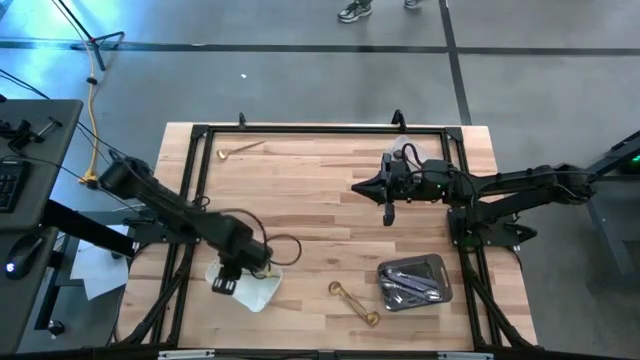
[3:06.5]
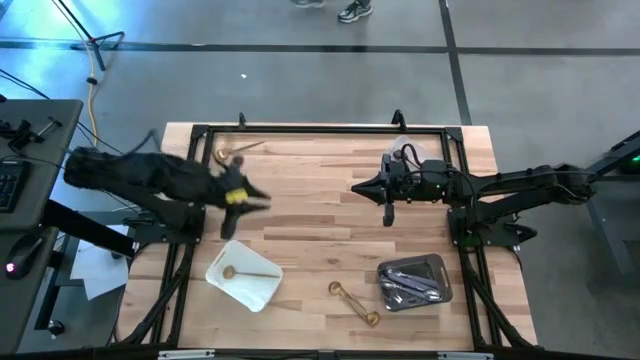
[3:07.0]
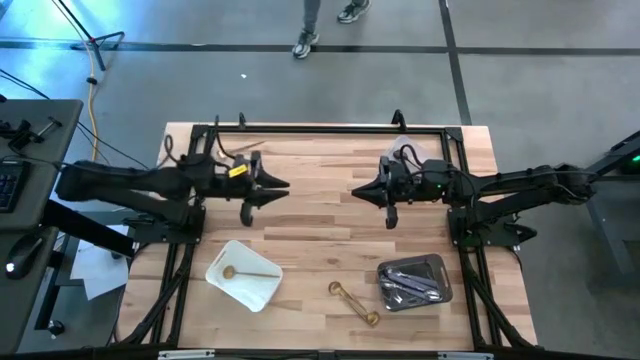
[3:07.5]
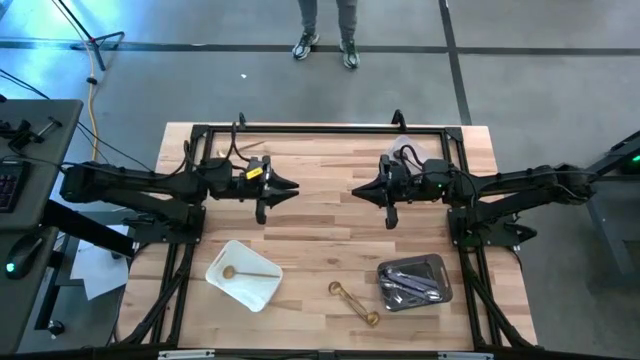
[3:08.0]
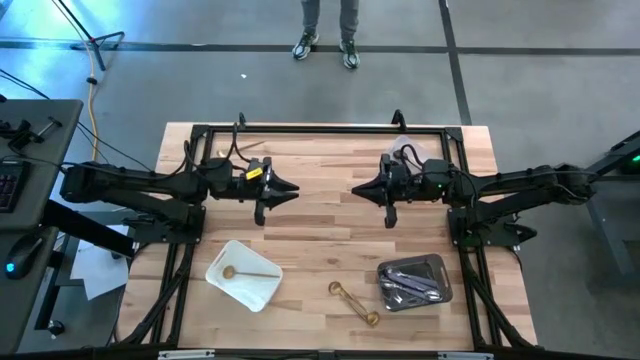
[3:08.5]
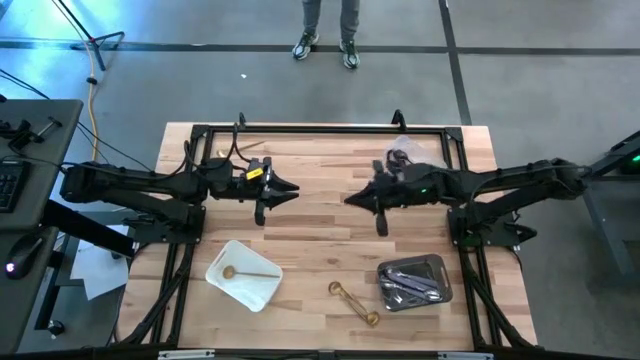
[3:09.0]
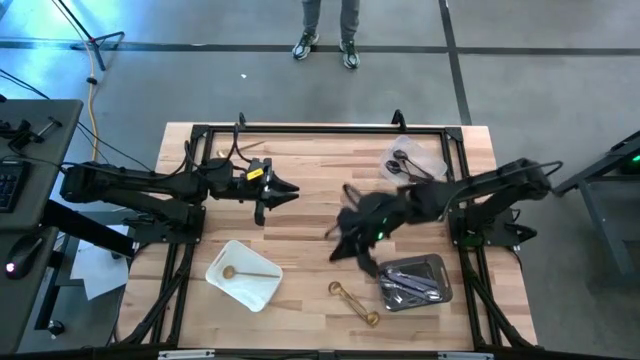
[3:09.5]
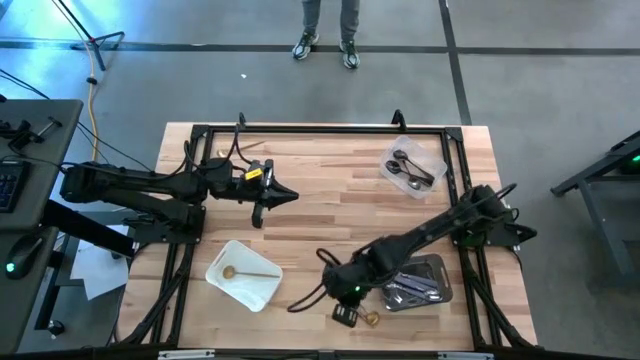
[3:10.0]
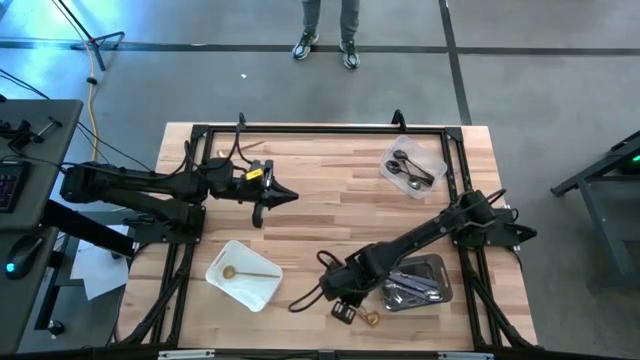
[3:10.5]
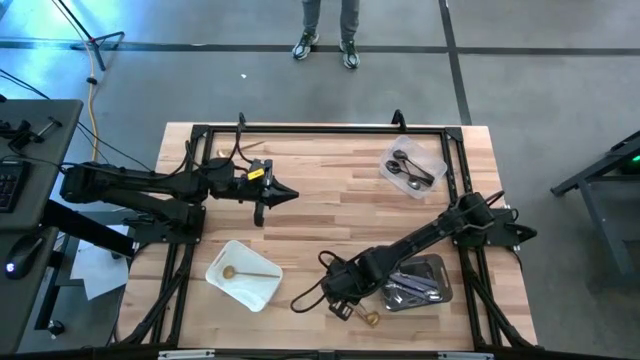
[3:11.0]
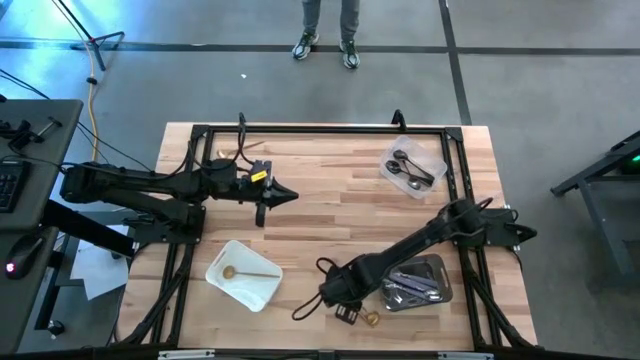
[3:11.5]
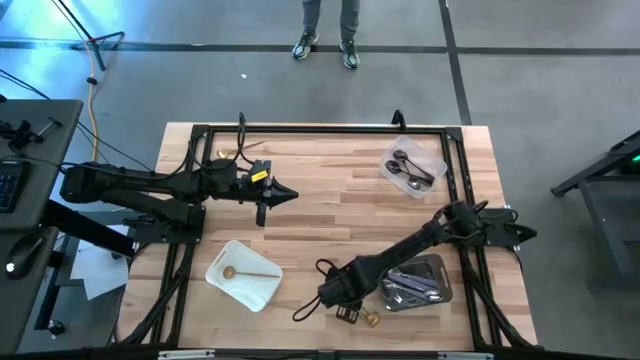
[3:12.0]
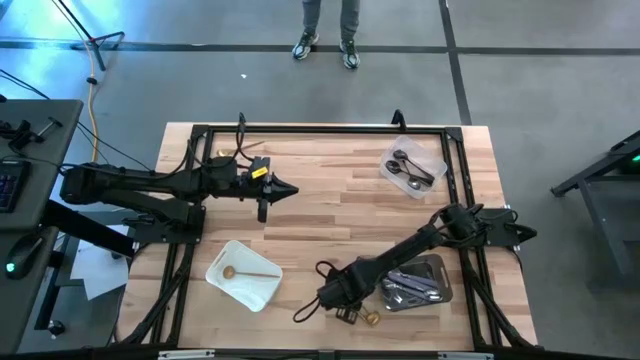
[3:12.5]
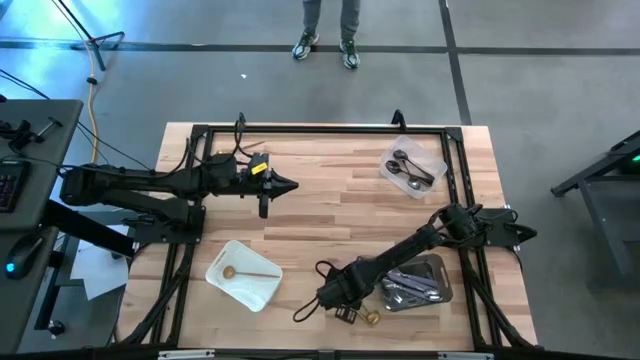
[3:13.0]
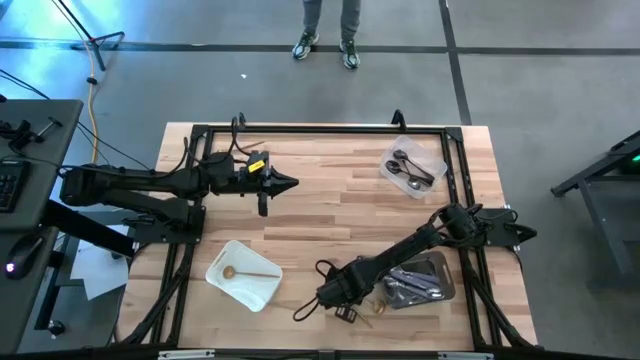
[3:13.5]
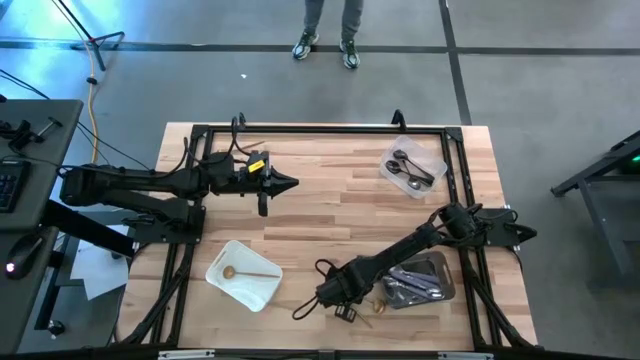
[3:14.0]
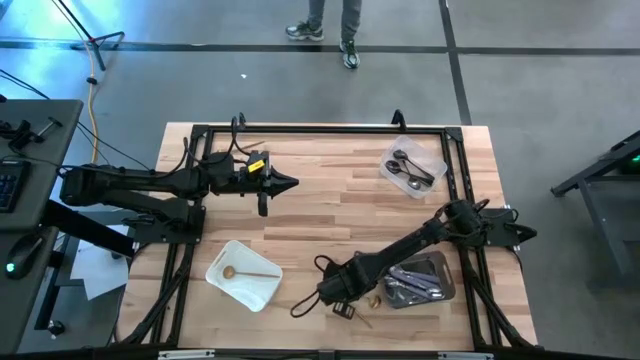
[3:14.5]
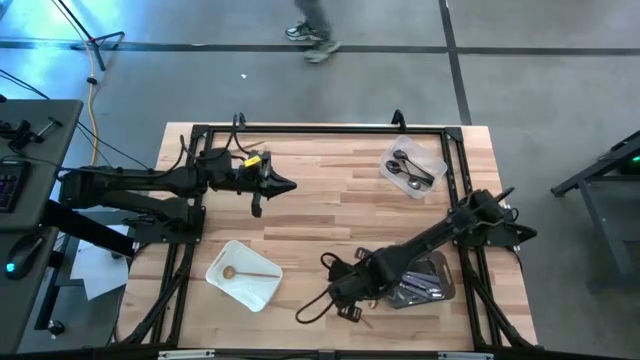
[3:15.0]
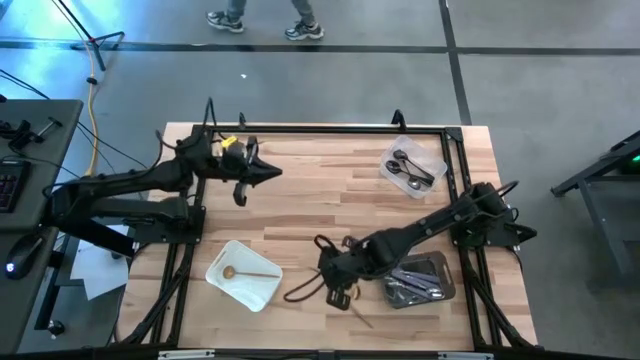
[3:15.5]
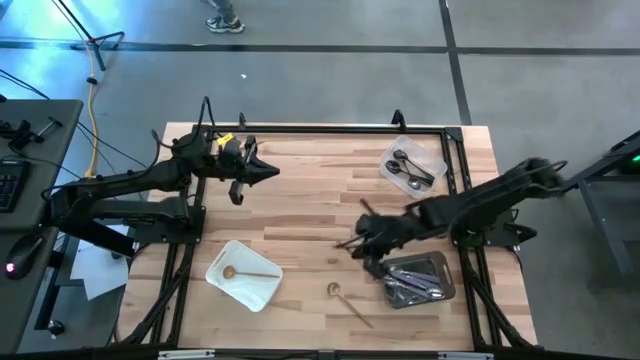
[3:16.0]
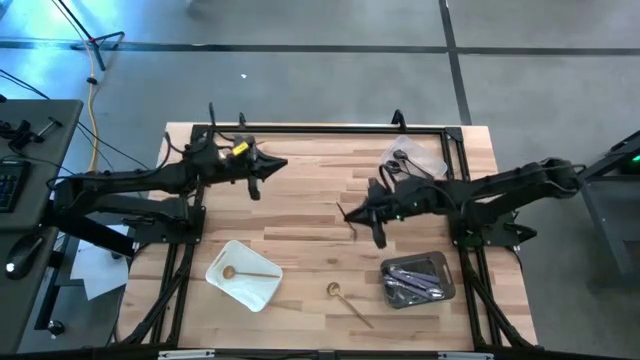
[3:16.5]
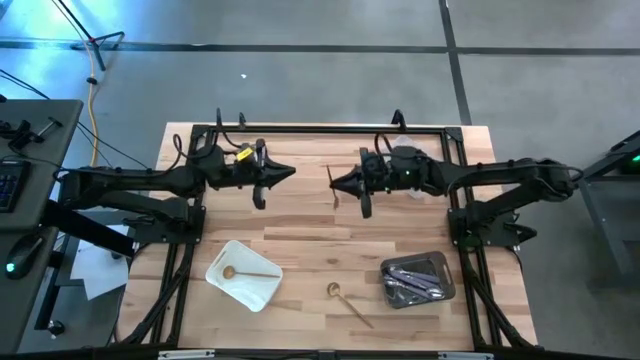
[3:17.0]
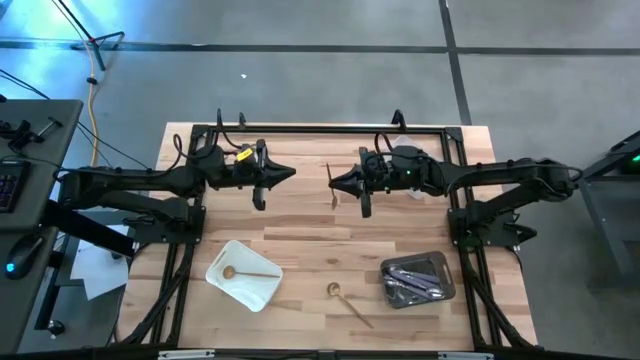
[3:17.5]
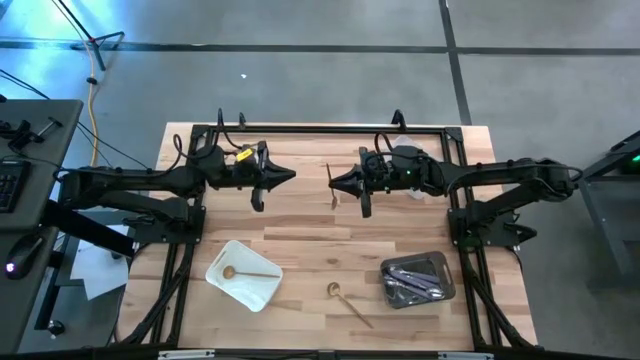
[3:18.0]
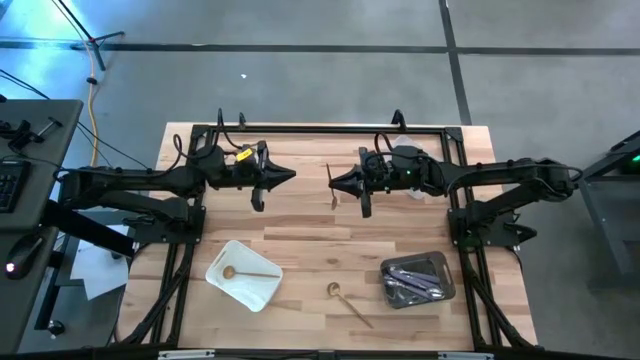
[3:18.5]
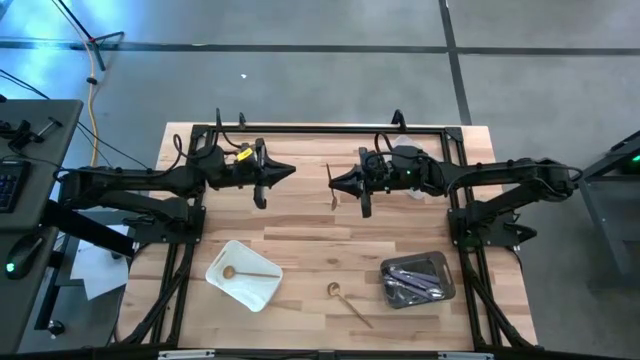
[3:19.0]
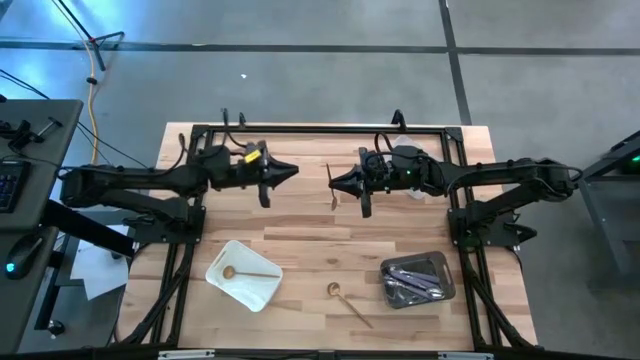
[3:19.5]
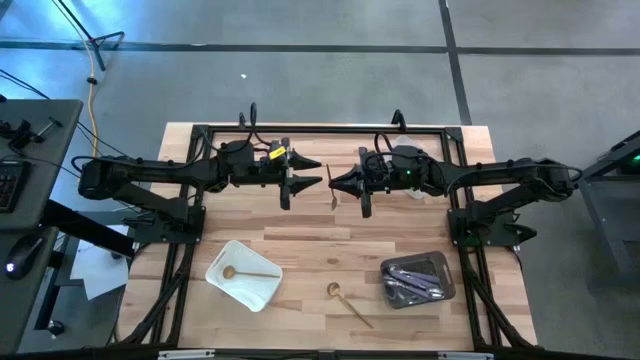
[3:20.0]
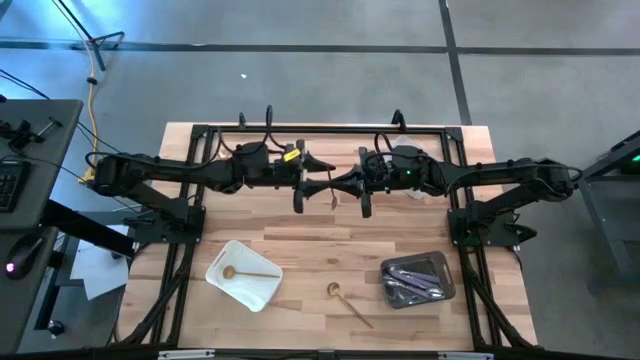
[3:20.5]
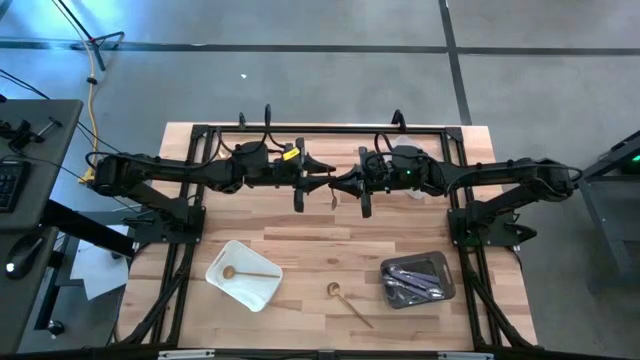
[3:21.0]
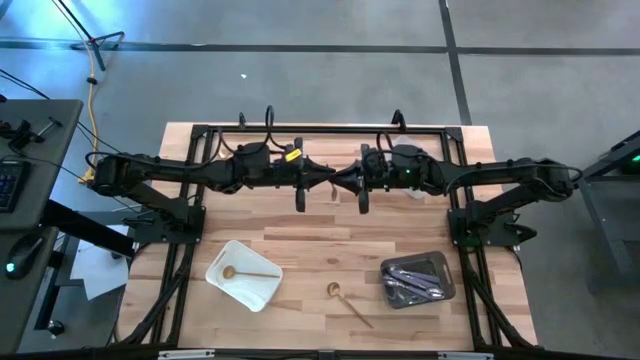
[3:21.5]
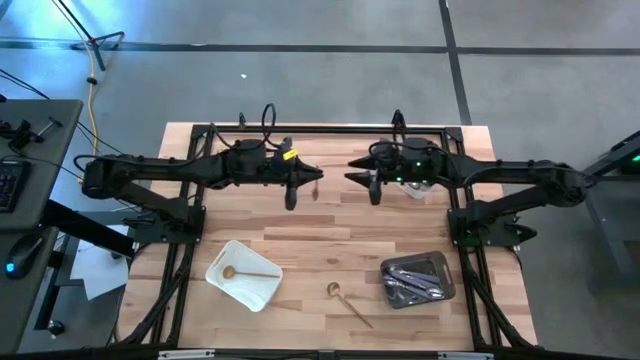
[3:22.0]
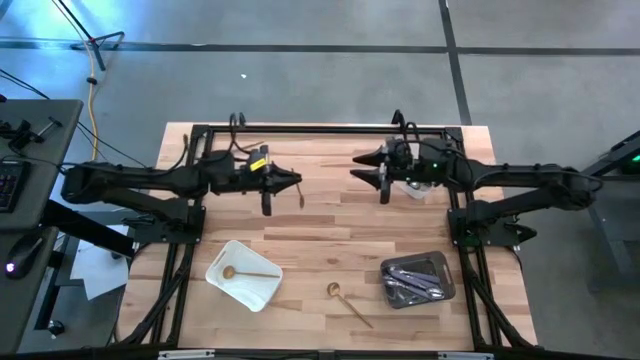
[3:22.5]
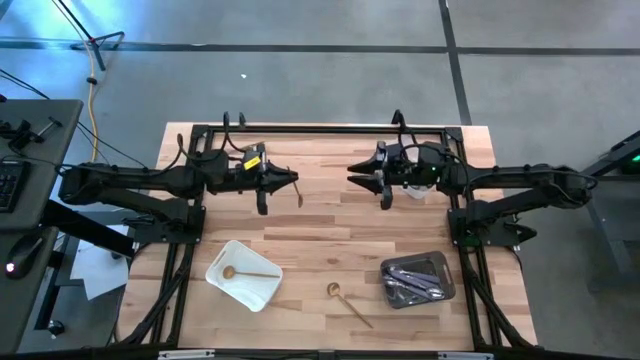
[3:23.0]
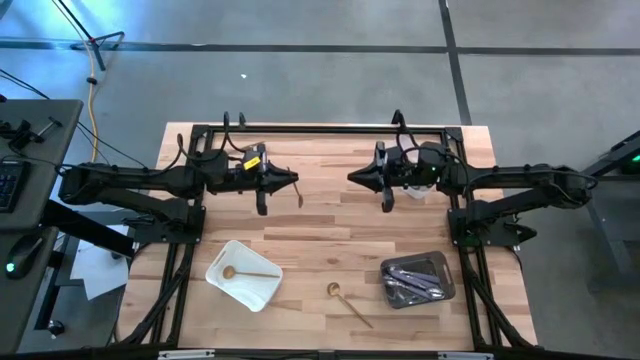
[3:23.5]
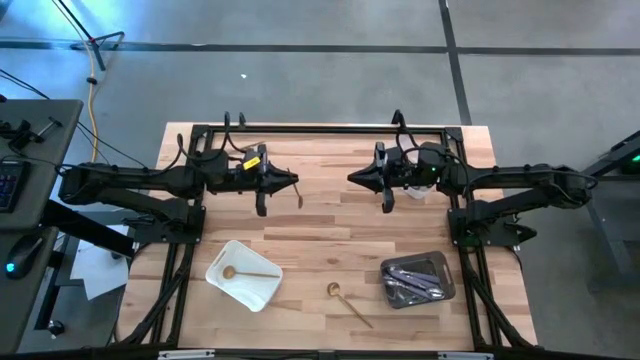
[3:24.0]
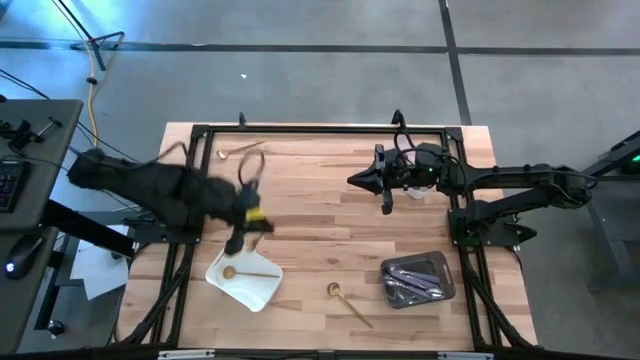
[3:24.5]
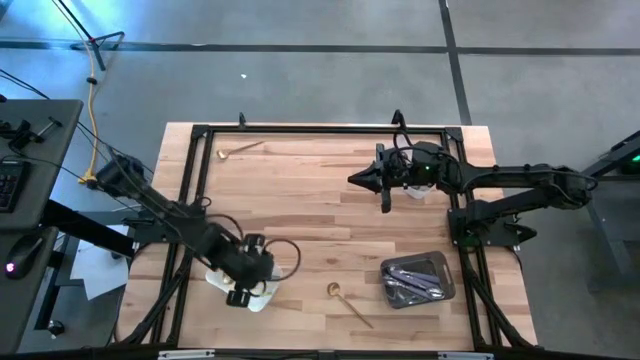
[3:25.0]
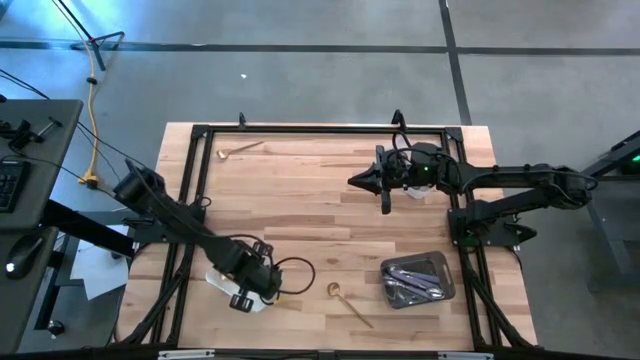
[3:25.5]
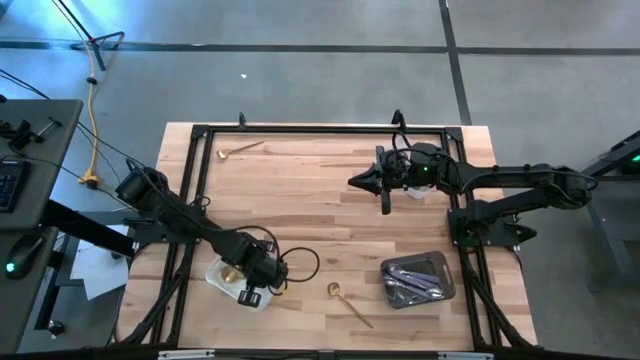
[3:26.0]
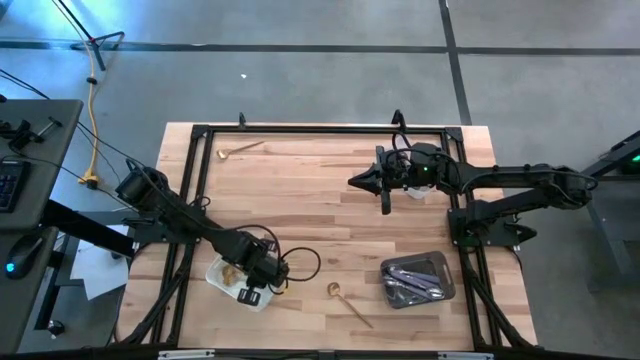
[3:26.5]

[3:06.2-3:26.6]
Task: Sort silverware by color (type)
Put the gold spoon into the white bin
